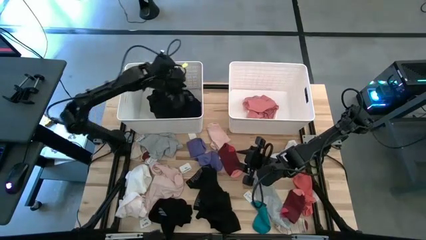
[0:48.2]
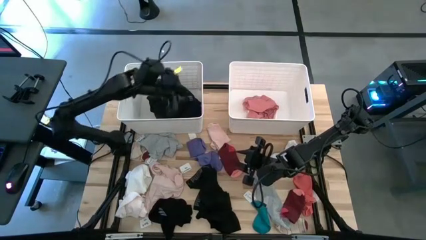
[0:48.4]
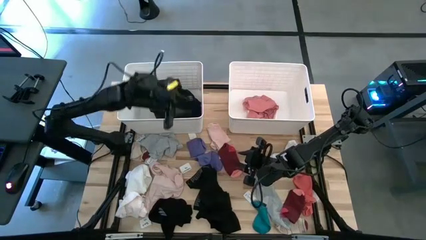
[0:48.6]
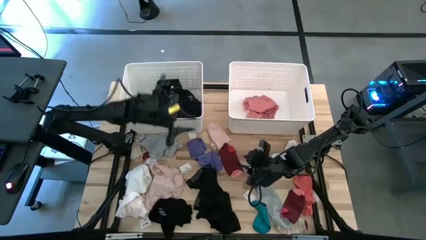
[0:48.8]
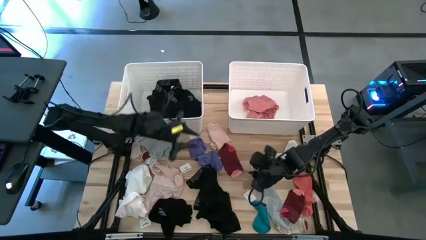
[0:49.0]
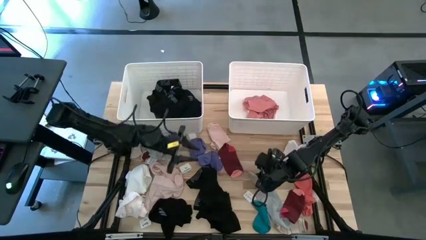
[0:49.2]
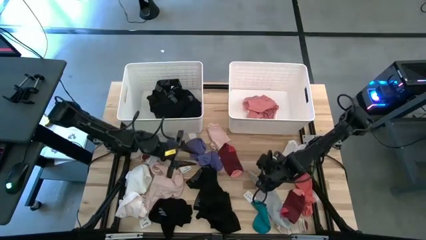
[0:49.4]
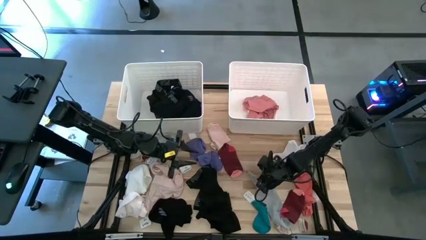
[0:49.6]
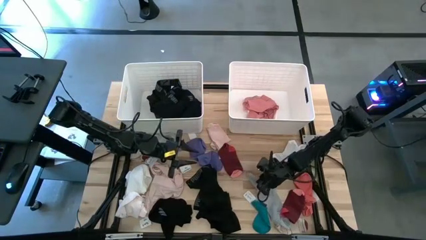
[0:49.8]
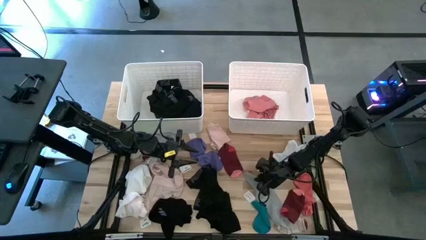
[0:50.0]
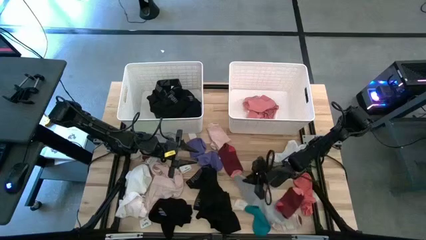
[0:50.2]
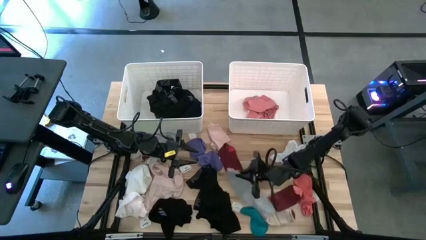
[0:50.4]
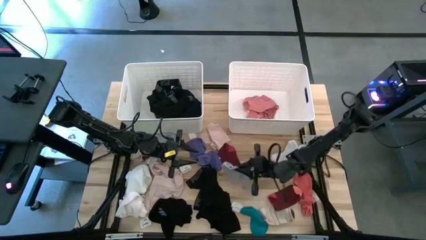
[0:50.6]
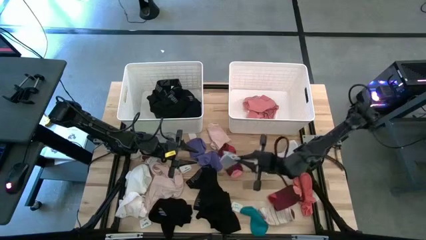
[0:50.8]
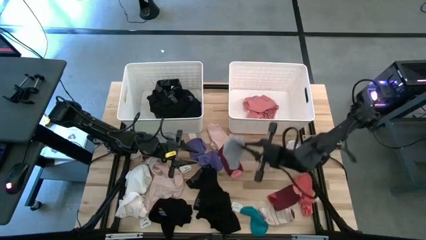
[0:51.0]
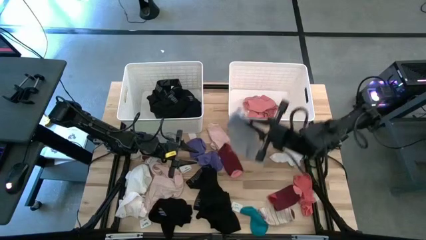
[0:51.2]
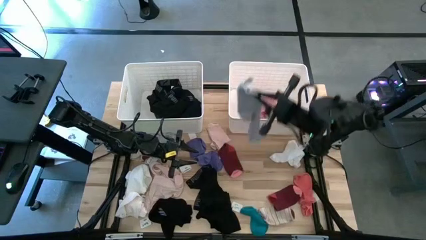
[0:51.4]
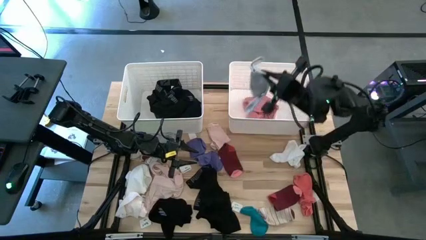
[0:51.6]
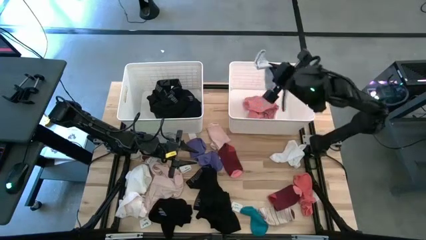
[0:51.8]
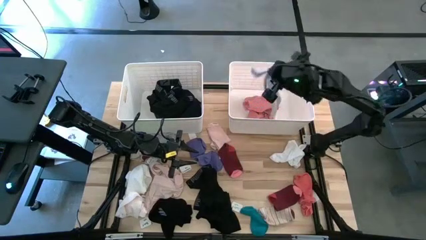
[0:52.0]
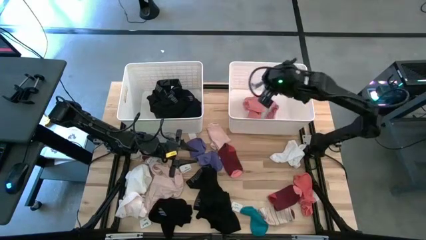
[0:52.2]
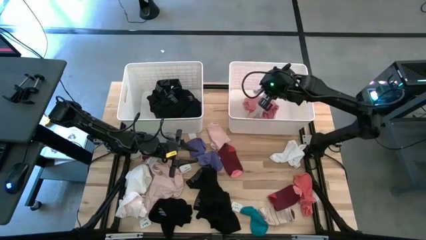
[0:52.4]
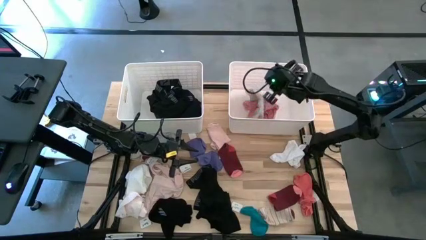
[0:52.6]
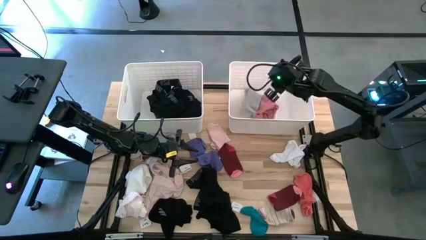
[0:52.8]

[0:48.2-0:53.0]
Task: Sort clothes
Put the gray sock into the right white laundry bin

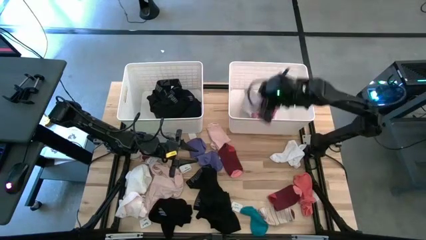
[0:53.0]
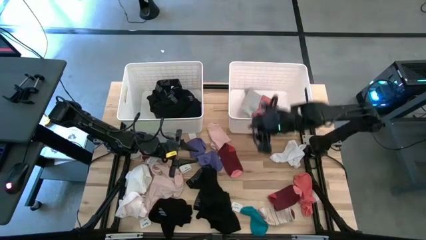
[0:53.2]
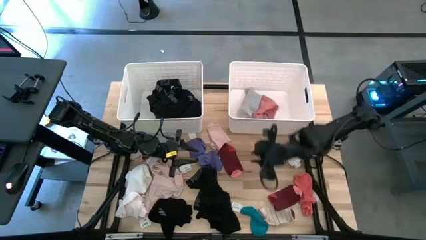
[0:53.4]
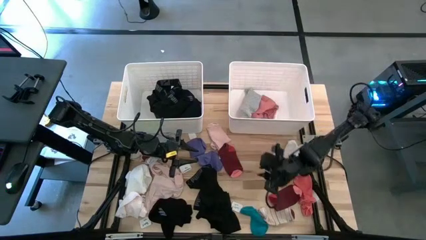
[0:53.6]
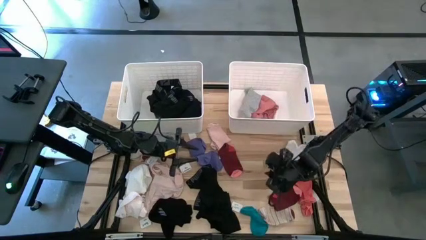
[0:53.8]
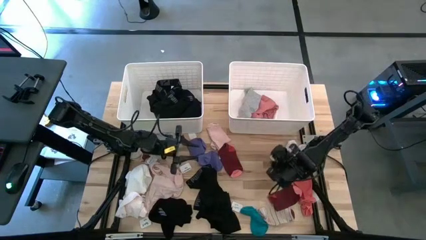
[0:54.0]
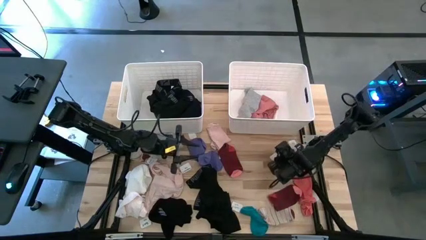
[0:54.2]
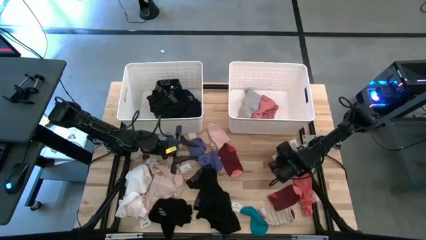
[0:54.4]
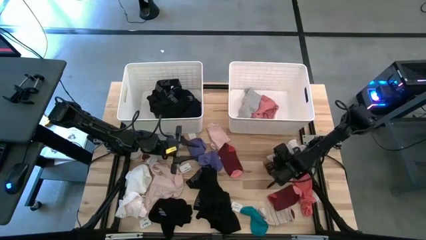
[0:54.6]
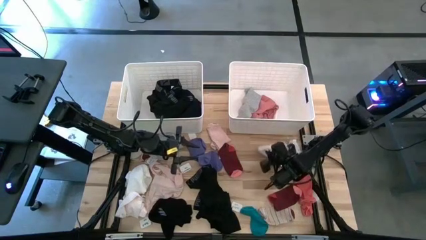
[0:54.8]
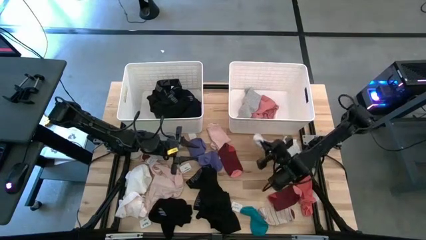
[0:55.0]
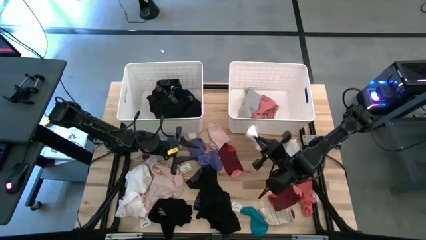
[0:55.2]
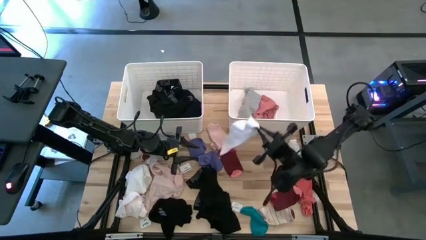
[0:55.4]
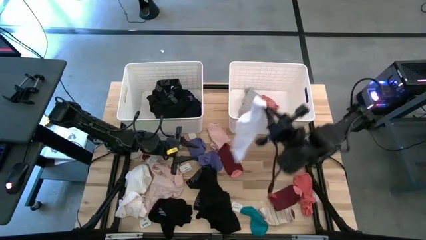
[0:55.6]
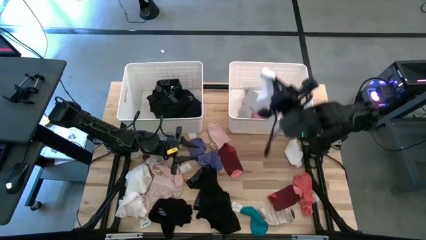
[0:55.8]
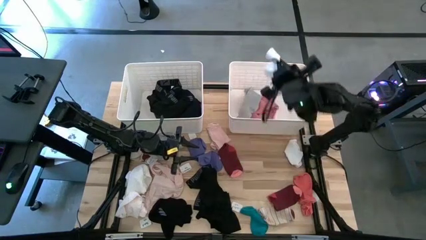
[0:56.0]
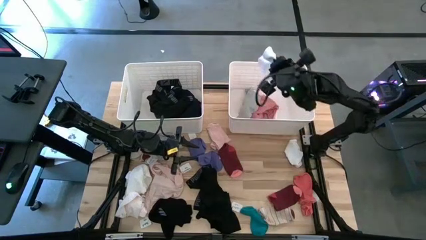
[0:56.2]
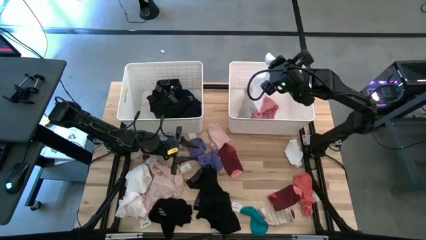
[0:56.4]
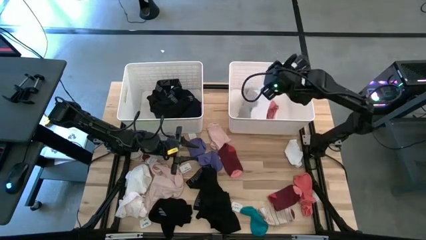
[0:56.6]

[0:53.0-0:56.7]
Put the white sock into the right white laundry bin

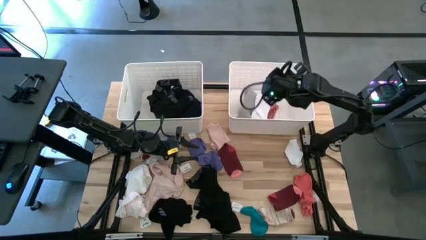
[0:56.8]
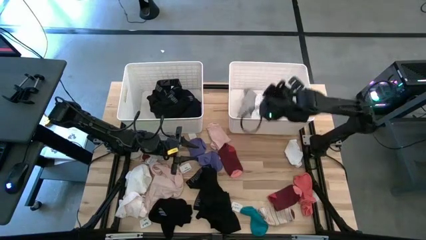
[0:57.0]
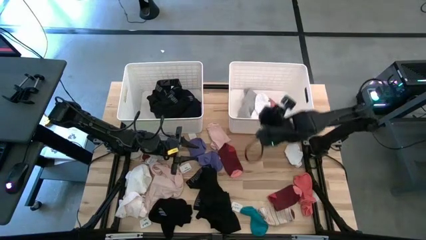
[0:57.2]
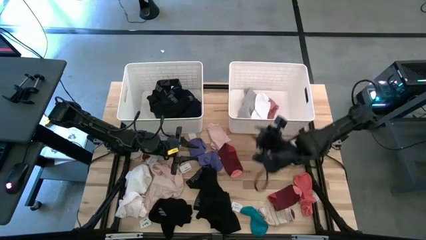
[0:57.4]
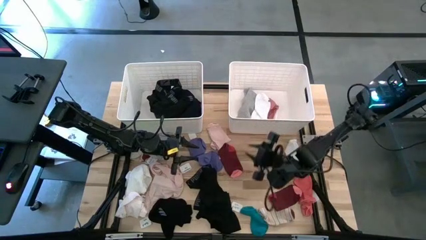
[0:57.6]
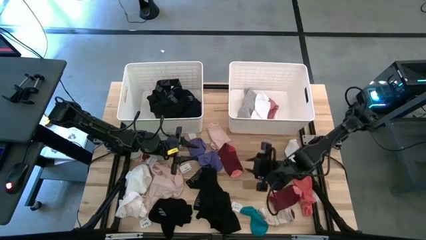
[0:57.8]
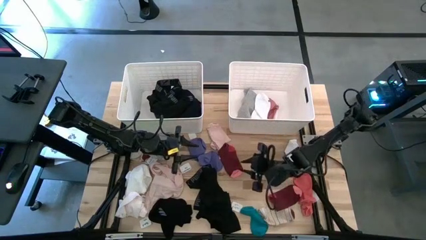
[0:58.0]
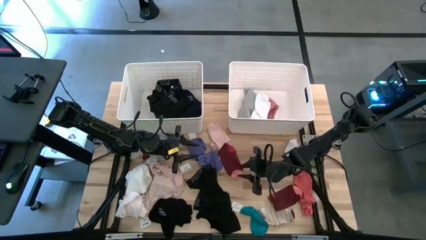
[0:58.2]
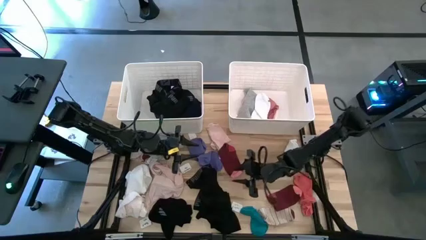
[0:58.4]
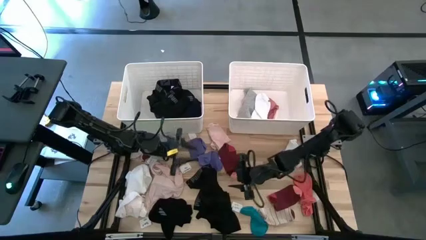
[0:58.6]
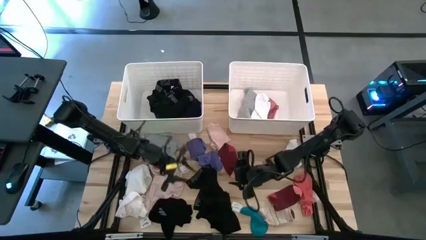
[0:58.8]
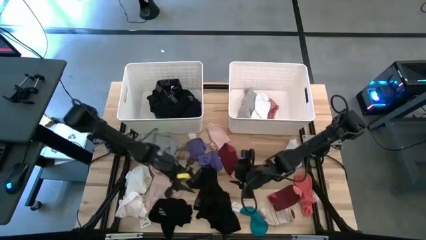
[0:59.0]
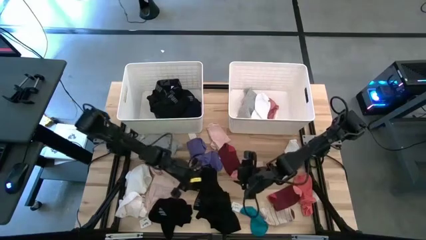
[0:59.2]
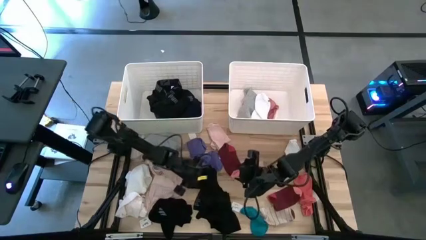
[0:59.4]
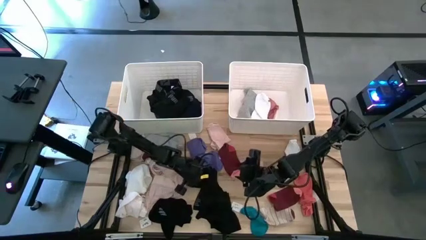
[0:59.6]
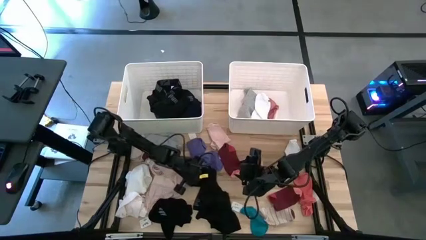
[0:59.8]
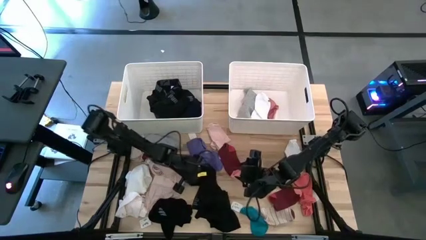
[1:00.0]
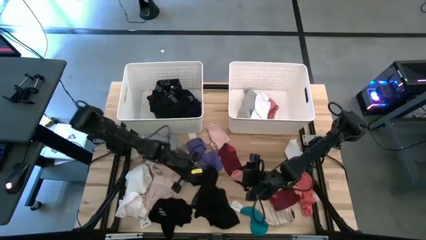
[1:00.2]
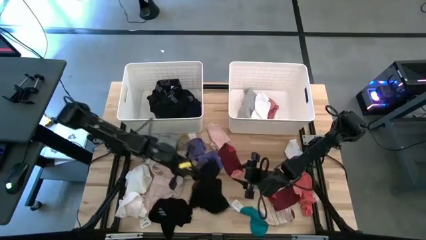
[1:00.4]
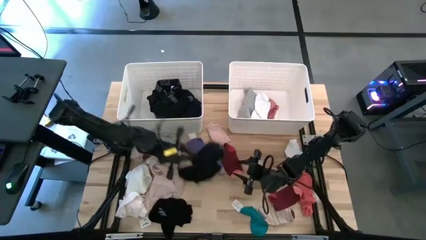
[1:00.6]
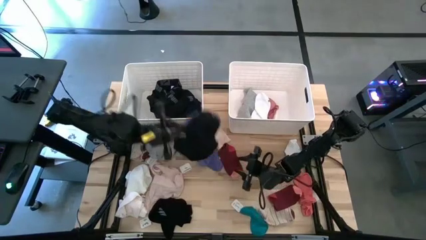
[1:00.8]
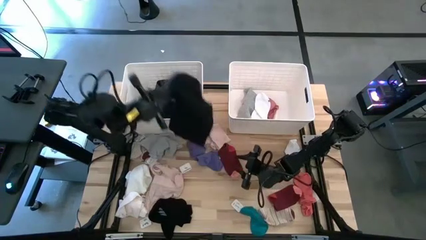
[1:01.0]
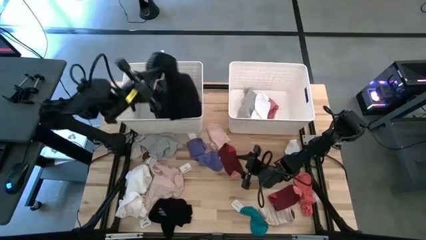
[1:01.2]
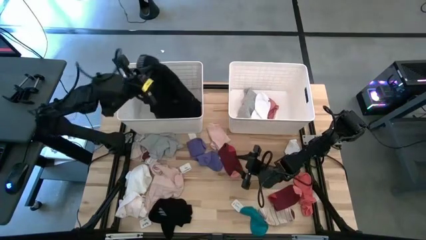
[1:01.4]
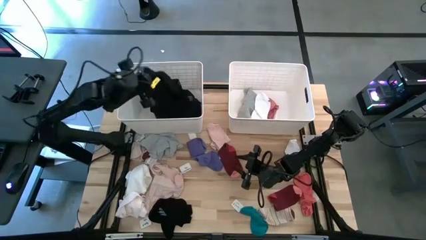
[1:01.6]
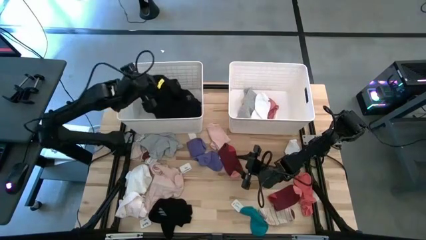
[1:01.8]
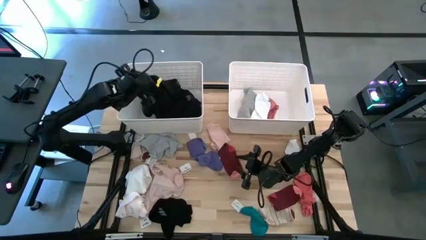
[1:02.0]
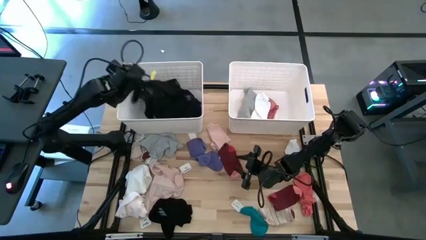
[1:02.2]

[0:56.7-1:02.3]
Put the black boxer into the left white laundry bin

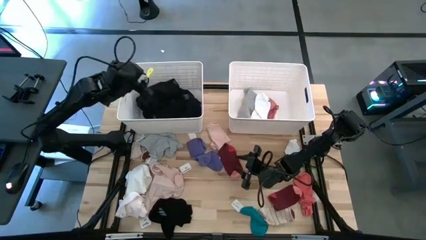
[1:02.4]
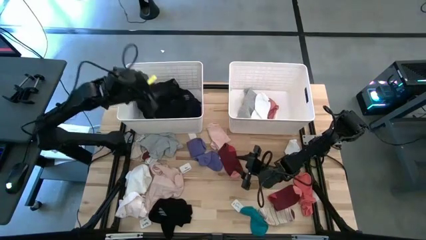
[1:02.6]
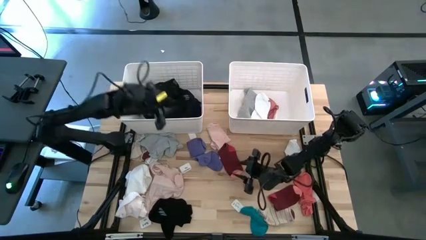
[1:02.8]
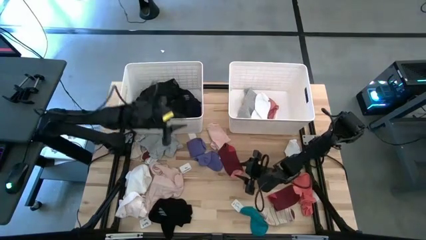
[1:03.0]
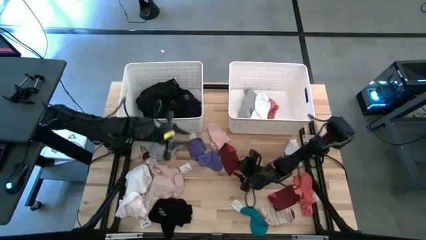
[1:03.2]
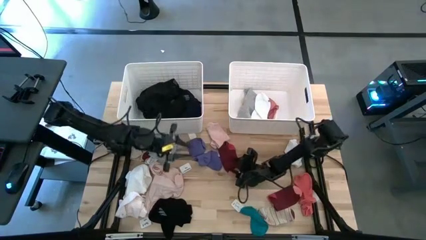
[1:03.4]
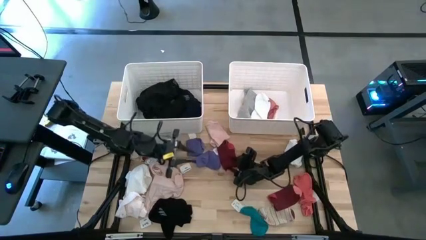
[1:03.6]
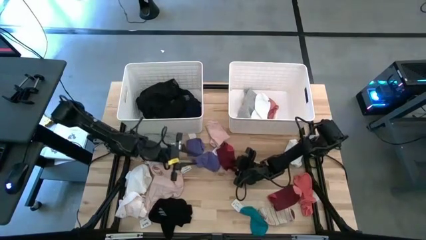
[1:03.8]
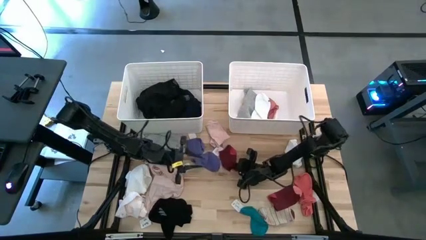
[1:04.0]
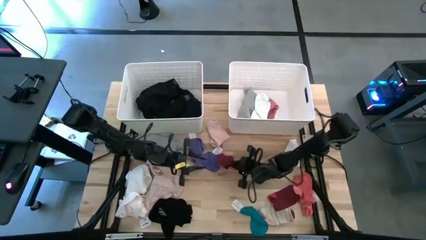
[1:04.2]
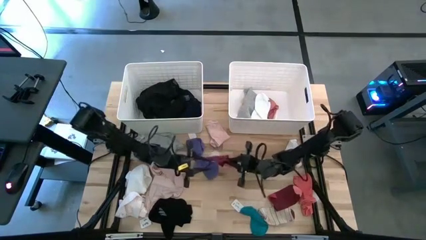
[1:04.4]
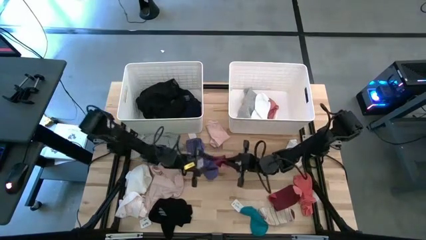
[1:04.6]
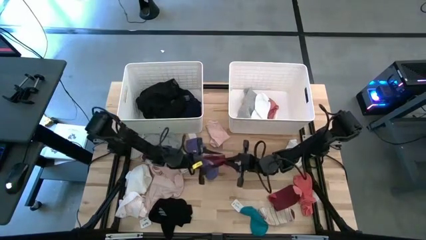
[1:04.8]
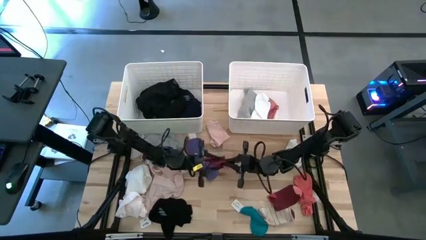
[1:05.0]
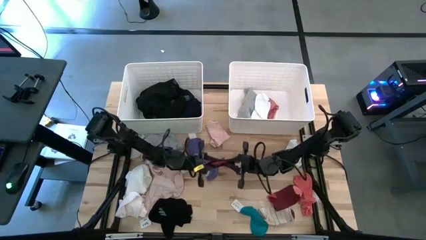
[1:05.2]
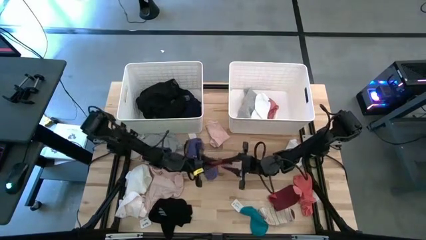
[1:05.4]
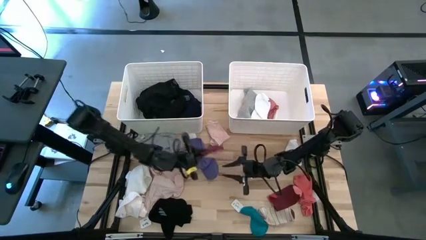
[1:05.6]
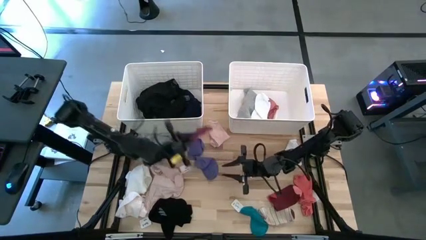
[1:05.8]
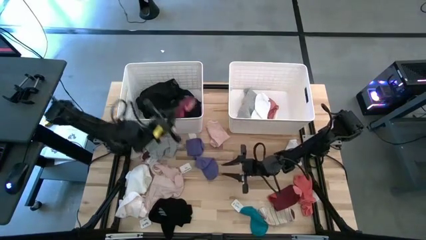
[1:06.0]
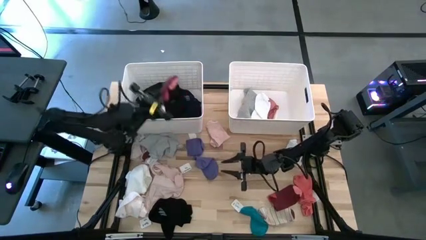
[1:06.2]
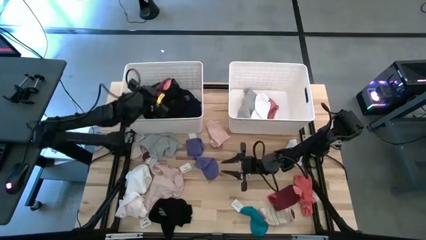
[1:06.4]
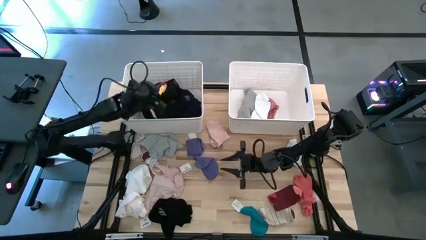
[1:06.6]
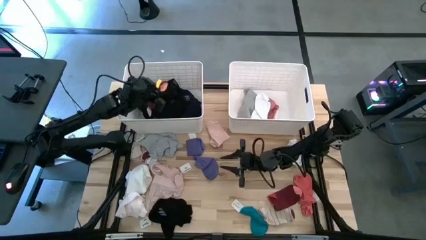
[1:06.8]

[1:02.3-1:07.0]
Put the red sock into the left white laundry bin
